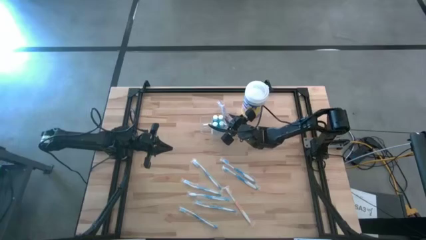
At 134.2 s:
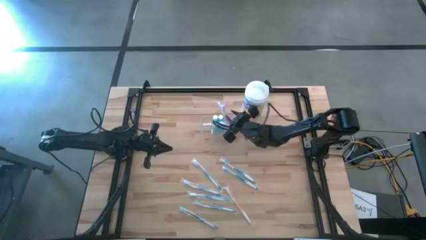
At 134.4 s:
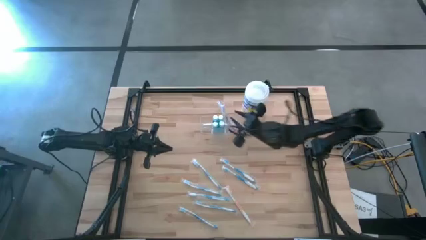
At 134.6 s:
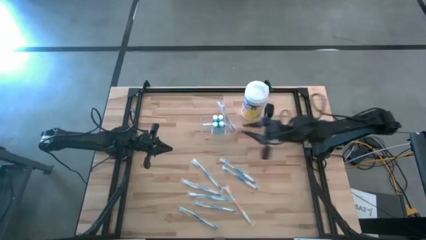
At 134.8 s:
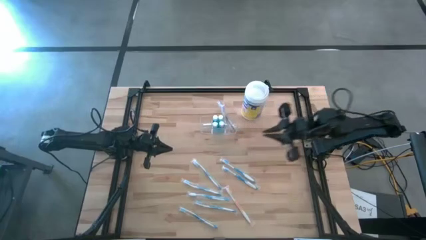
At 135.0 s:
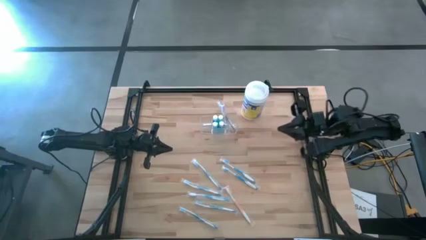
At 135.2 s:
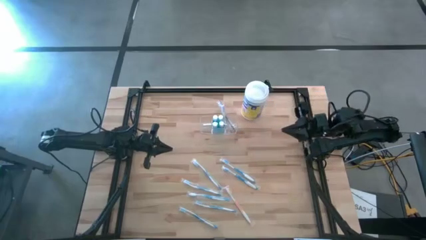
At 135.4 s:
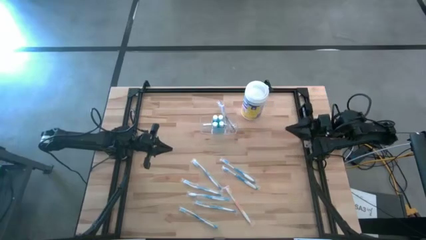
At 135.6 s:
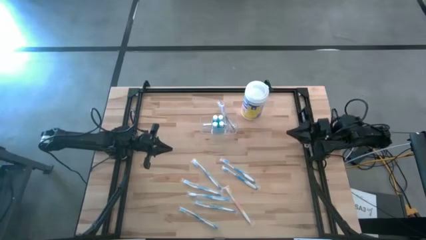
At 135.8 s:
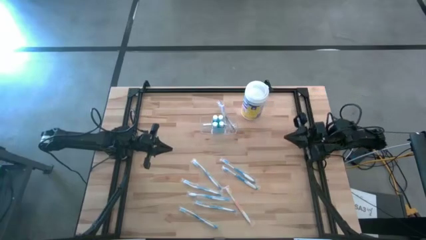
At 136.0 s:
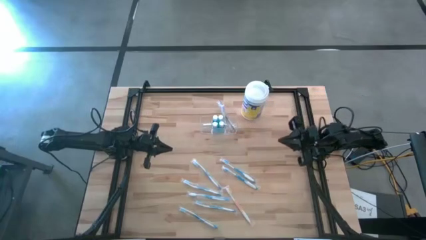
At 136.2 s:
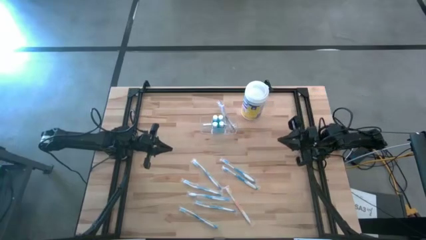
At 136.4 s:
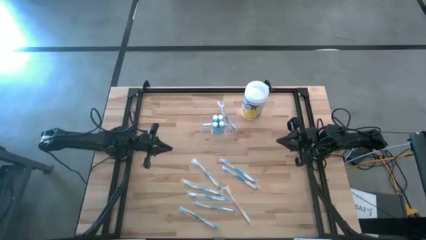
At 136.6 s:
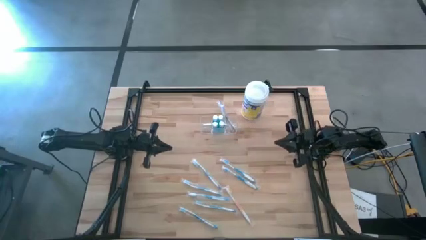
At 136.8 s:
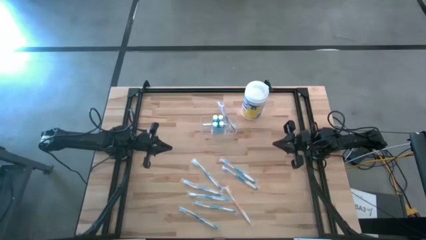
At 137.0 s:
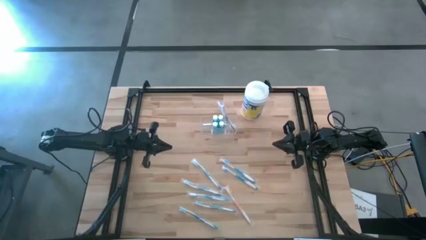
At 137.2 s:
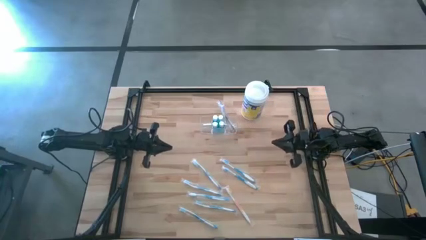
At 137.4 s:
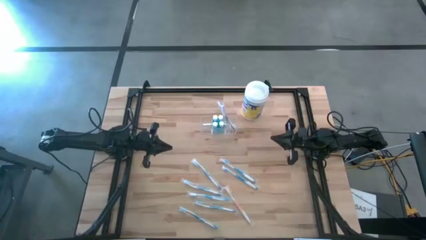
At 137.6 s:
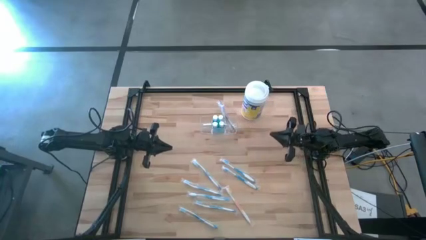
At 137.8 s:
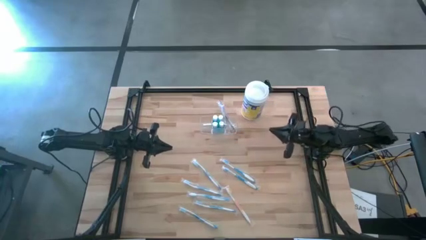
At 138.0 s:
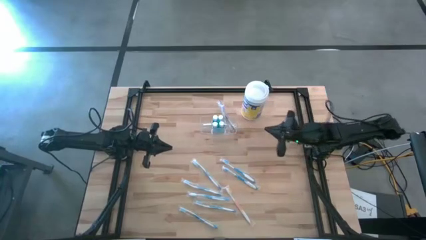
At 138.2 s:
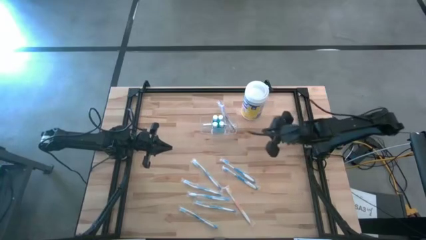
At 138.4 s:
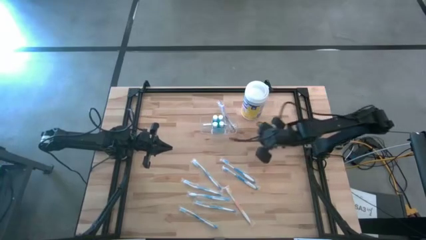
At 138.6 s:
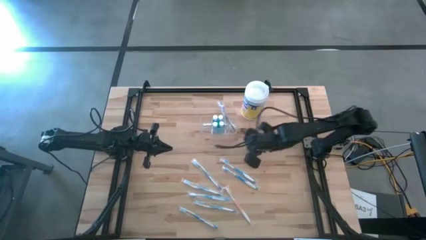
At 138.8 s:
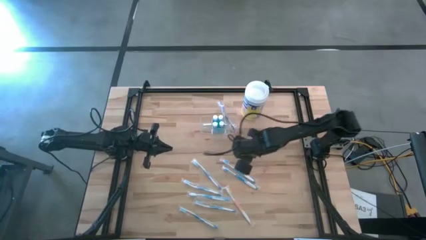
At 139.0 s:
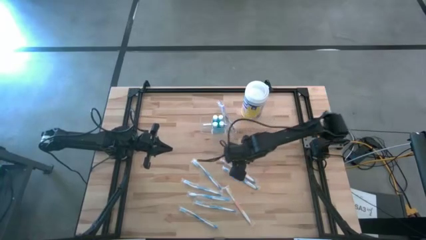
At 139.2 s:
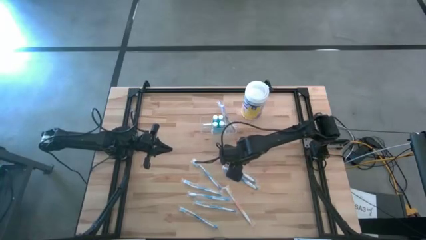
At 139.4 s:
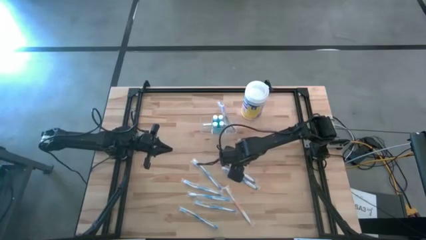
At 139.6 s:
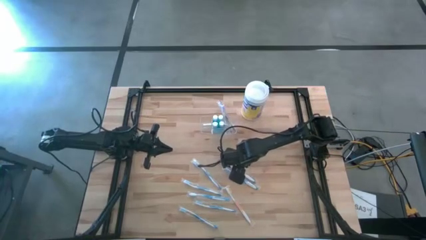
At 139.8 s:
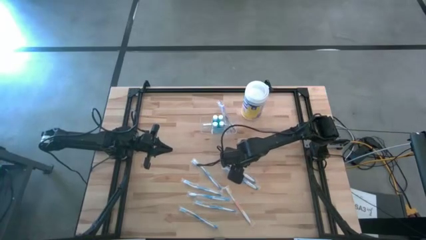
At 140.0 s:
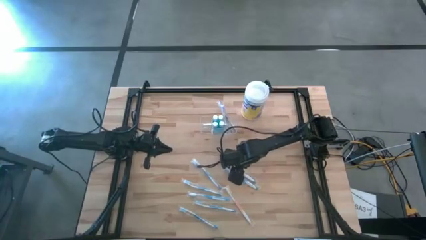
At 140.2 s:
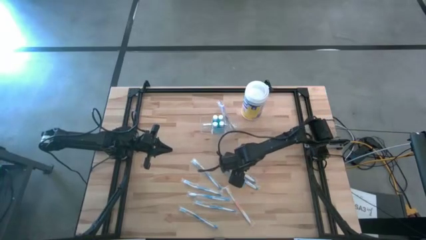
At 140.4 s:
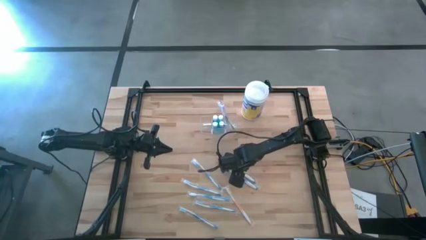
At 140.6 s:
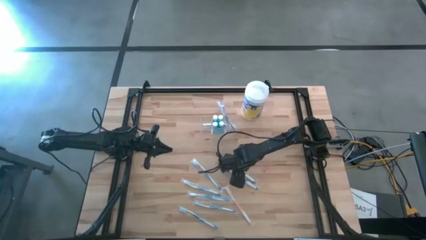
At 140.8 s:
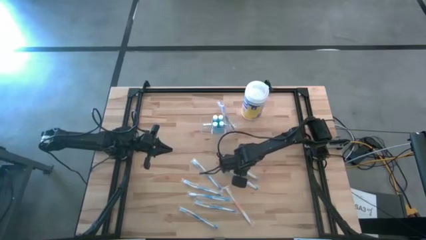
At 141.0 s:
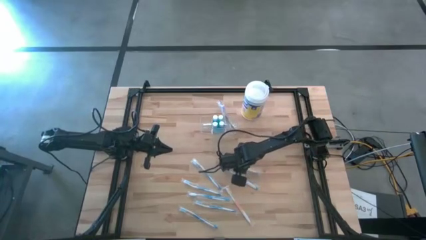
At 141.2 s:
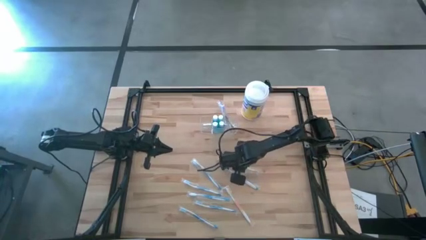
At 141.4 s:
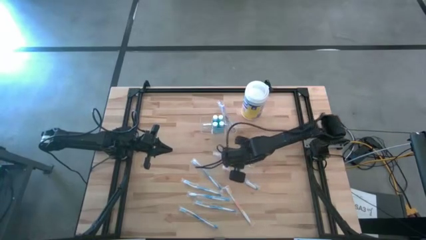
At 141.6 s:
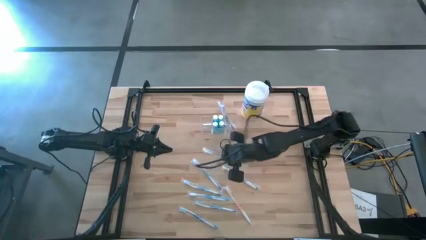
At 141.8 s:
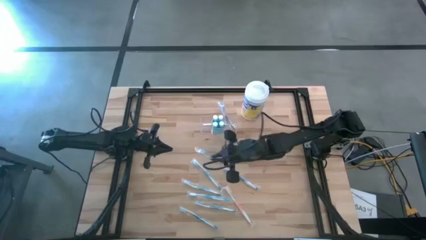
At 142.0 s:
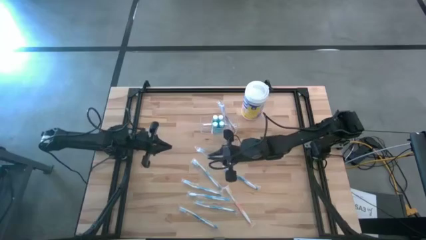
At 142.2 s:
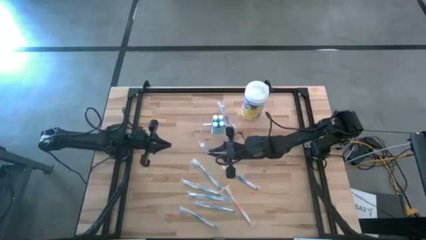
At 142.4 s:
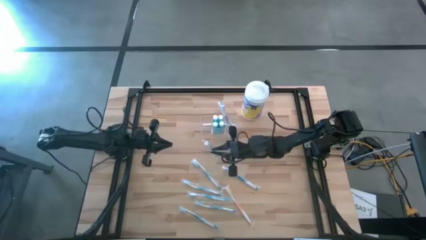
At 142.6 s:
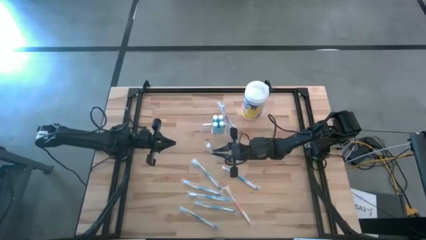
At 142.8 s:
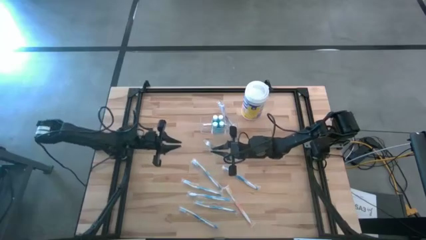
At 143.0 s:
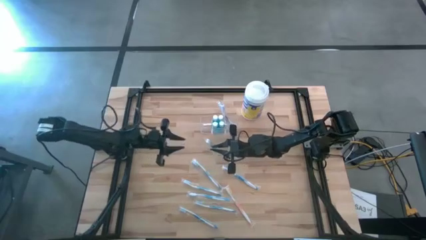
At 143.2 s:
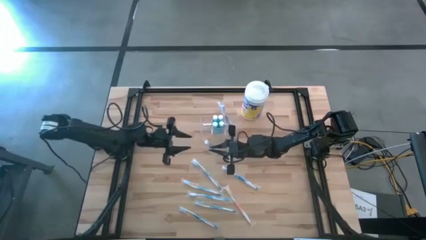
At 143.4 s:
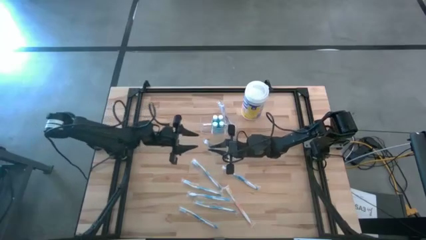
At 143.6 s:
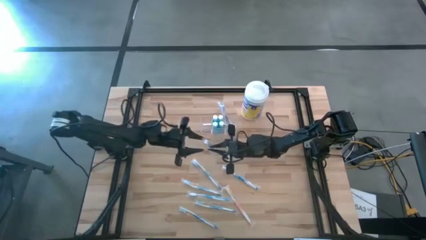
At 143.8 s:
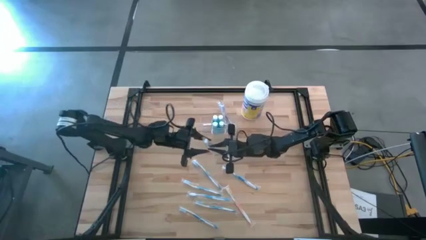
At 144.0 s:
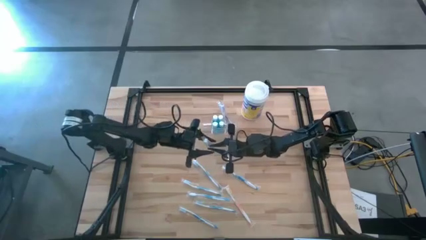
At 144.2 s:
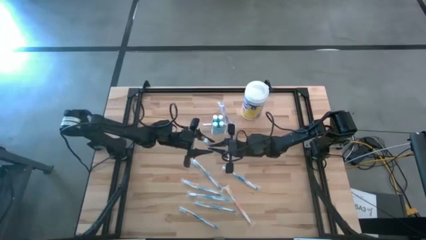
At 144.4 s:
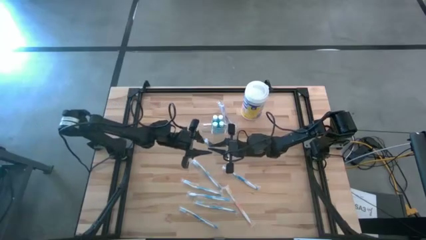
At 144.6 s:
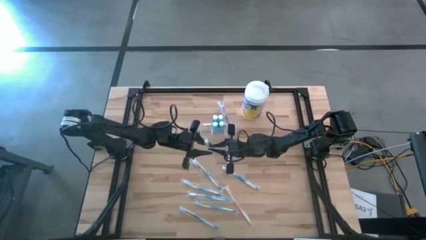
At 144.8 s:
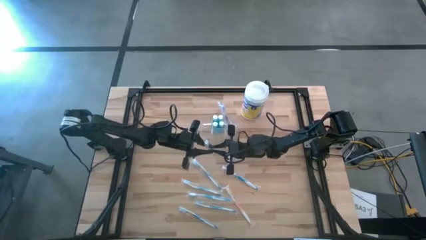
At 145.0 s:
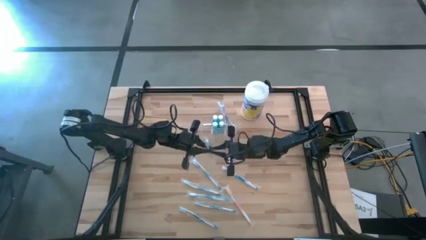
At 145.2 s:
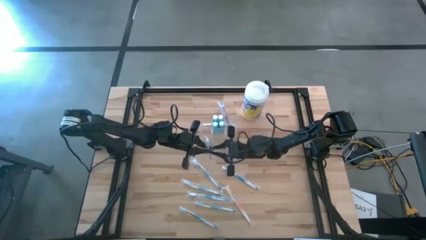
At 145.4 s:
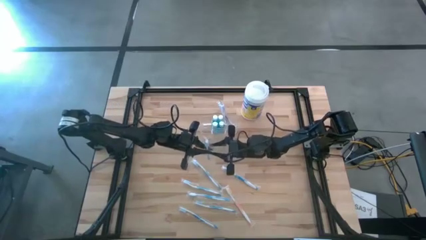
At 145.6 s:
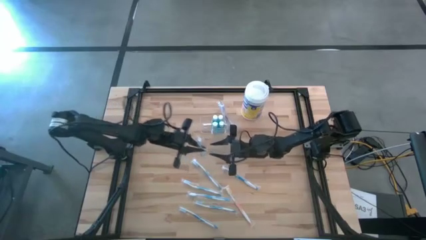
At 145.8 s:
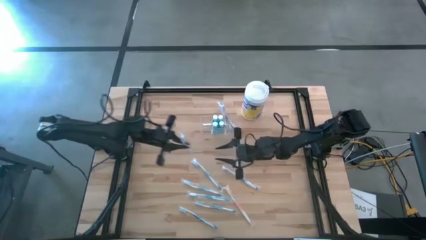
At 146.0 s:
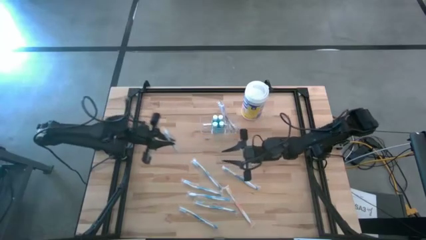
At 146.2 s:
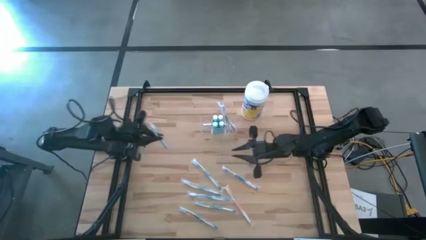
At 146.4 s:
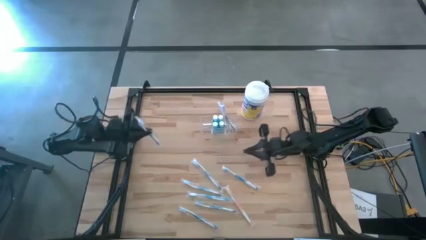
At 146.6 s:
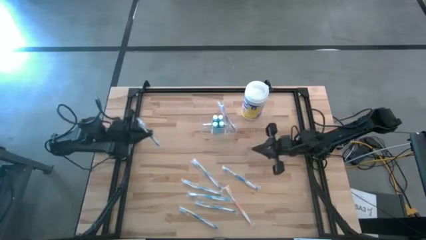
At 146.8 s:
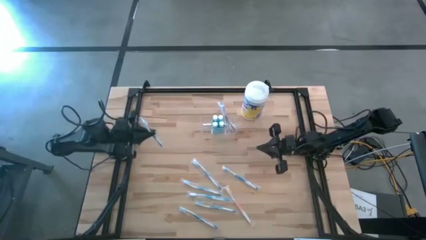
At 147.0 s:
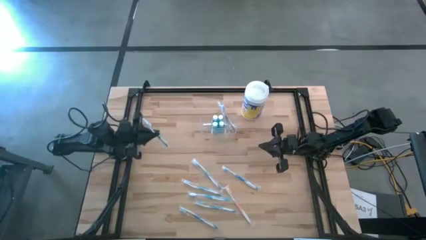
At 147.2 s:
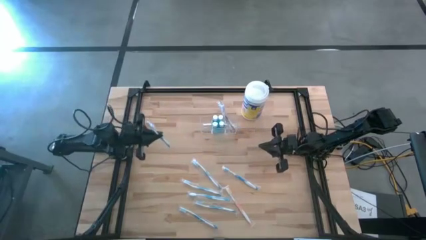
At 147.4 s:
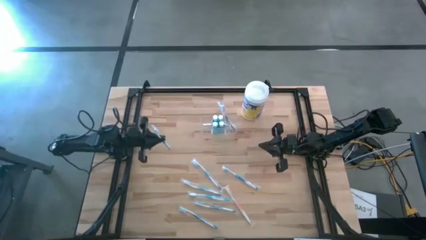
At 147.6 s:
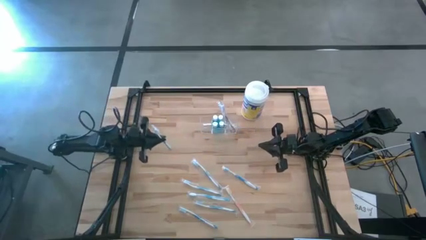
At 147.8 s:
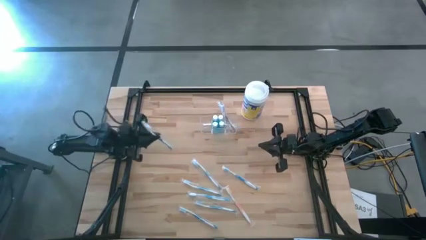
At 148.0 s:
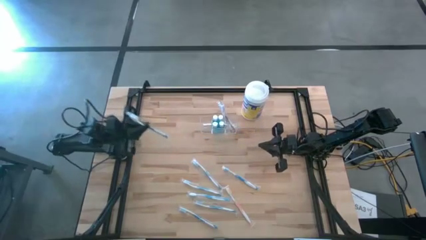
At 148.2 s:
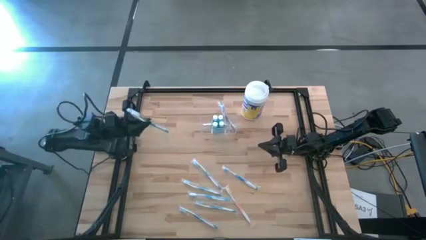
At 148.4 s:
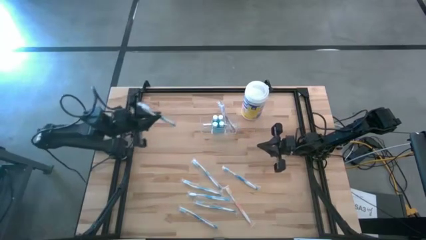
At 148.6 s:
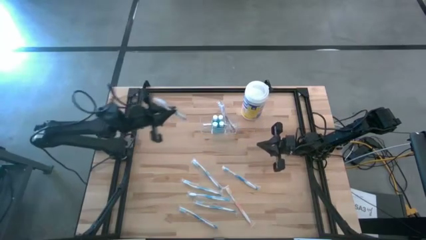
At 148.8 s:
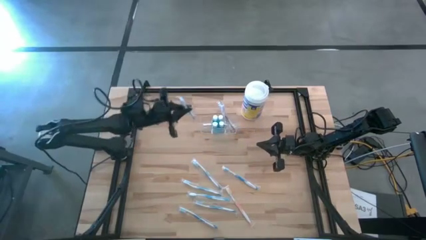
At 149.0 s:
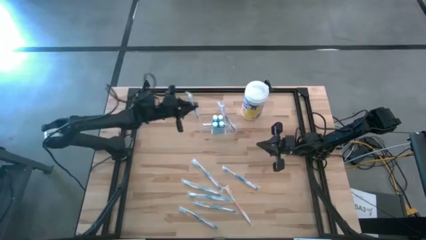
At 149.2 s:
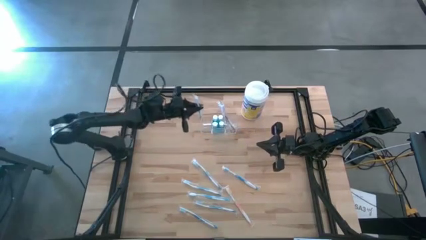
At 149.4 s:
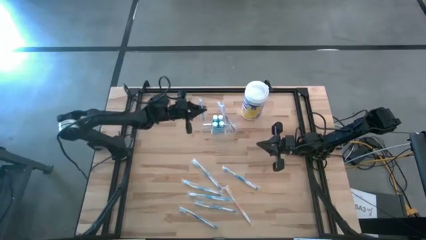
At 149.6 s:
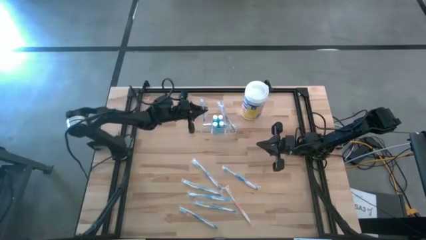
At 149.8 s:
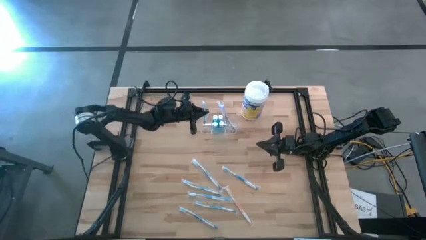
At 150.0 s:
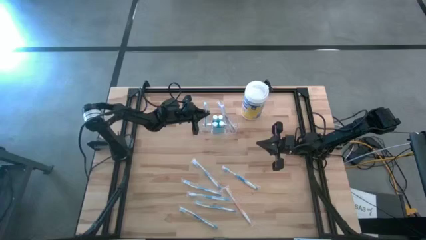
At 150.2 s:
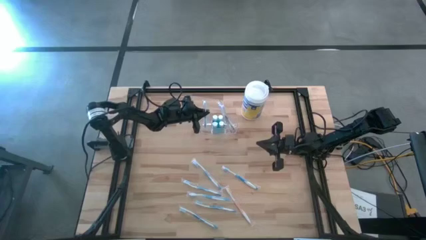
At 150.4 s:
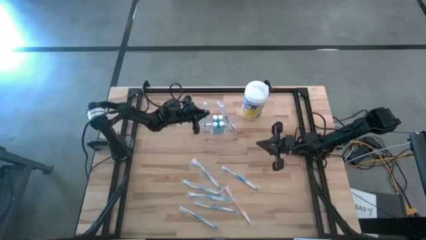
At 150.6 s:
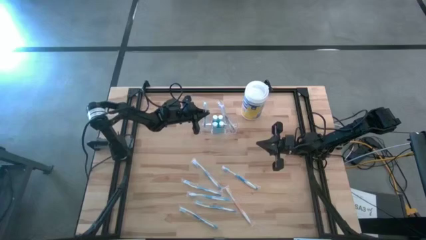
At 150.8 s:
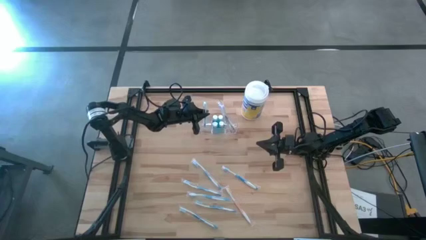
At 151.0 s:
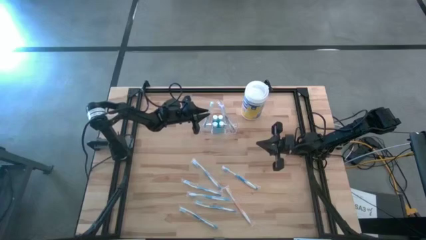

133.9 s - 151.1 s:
Task: Pick & Place toothbrushing station
Put the blue toothbrush into the transparent organizer
